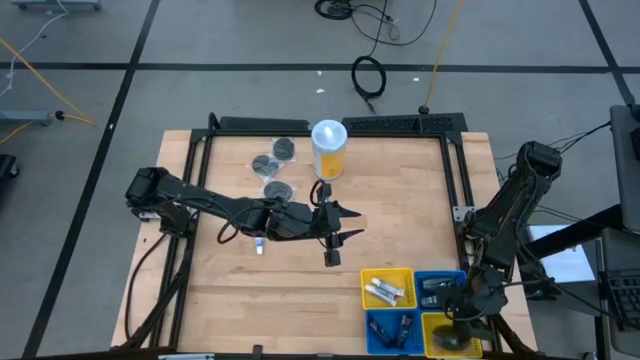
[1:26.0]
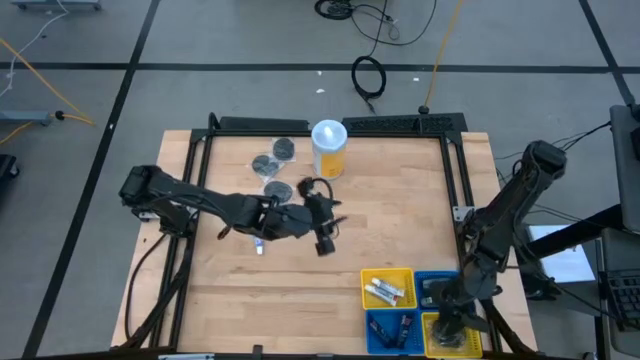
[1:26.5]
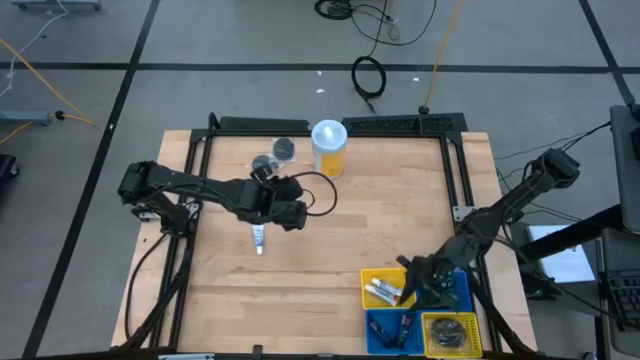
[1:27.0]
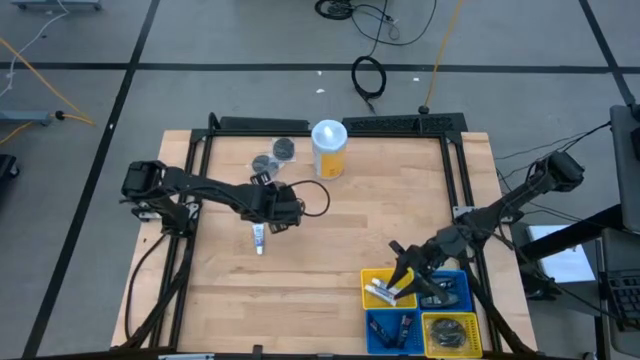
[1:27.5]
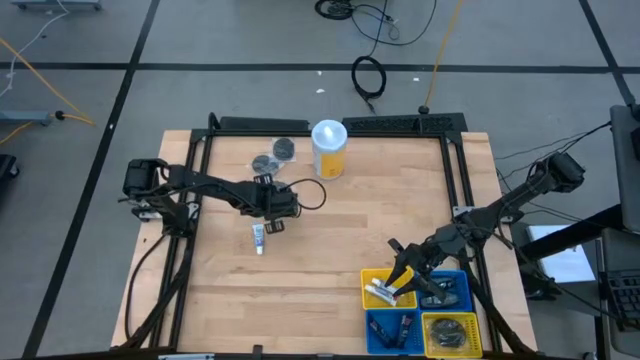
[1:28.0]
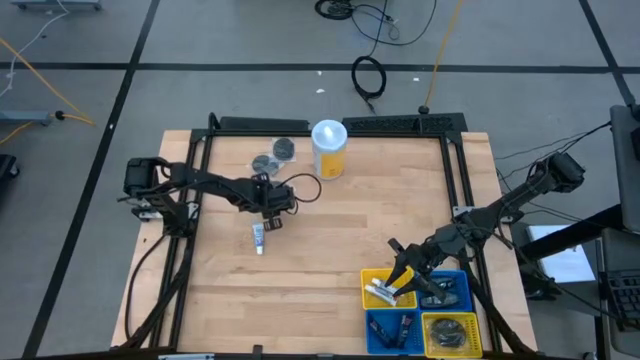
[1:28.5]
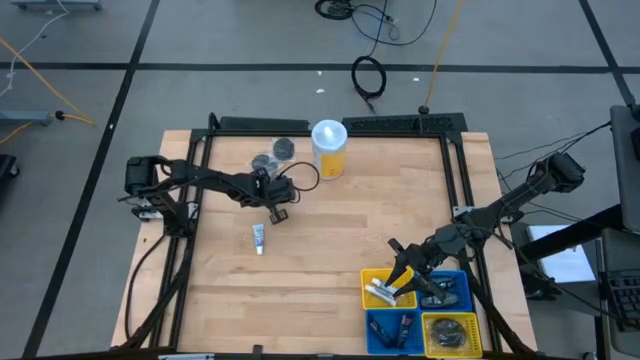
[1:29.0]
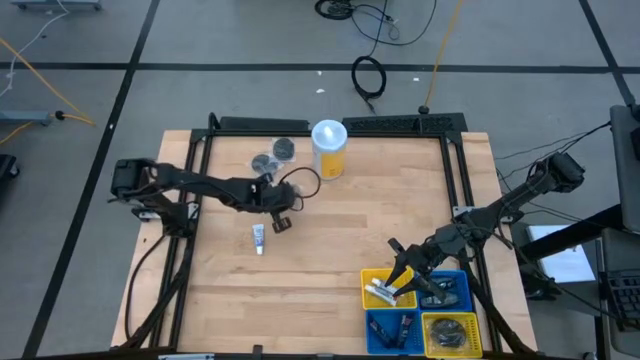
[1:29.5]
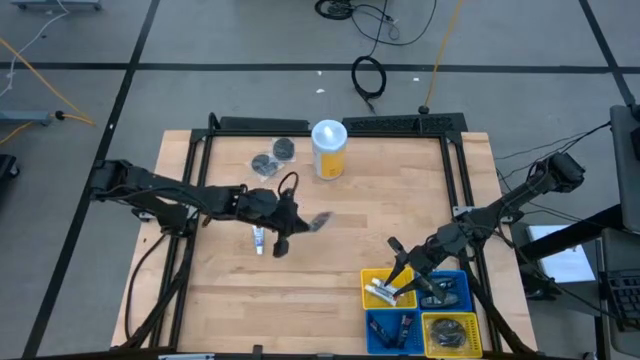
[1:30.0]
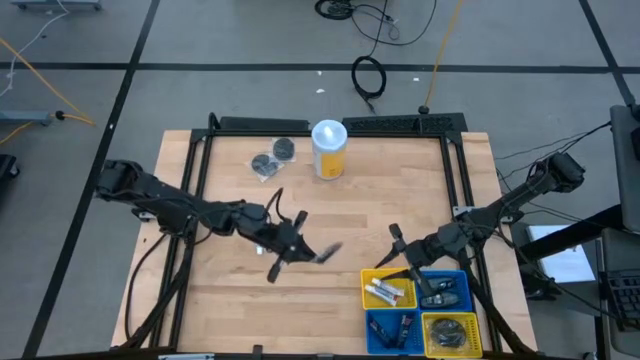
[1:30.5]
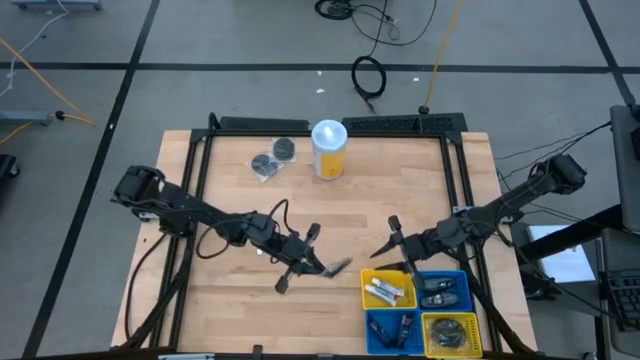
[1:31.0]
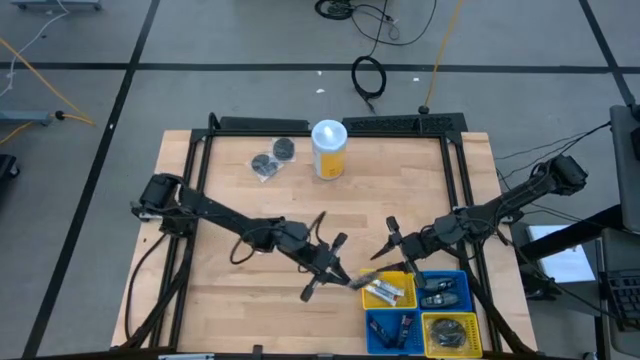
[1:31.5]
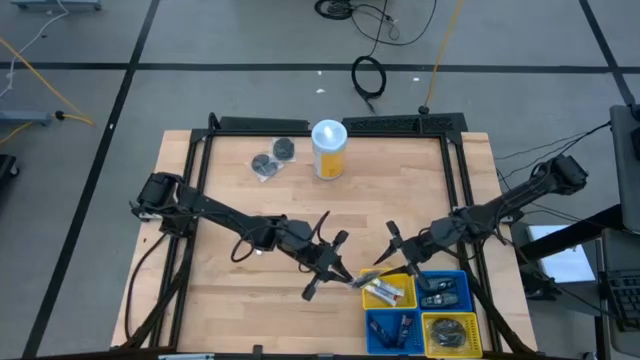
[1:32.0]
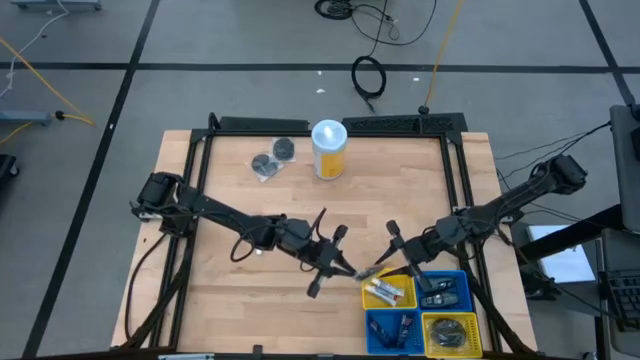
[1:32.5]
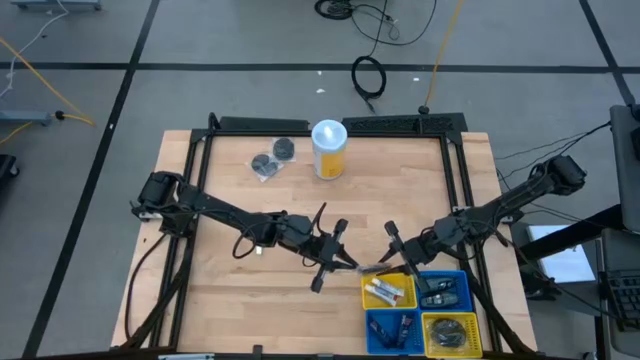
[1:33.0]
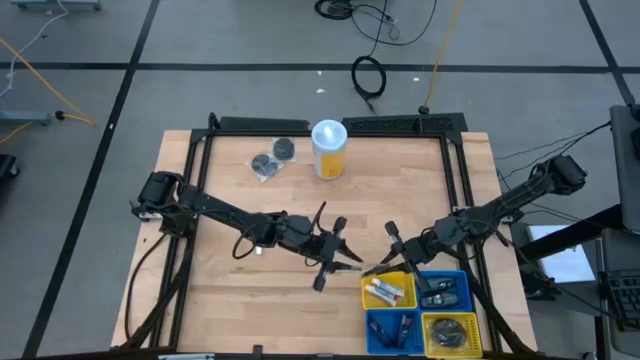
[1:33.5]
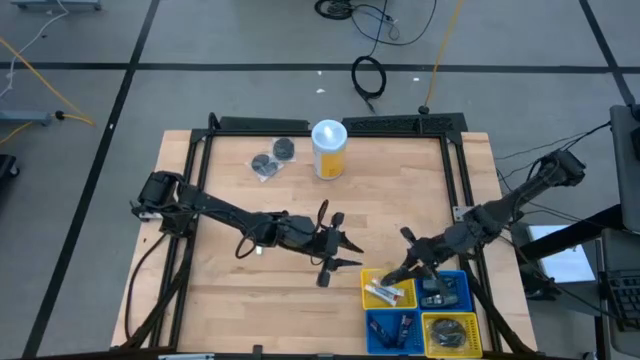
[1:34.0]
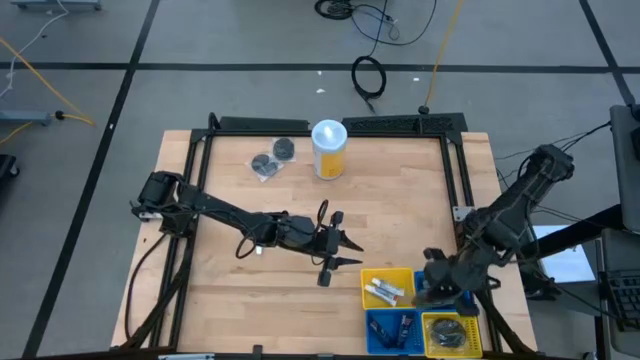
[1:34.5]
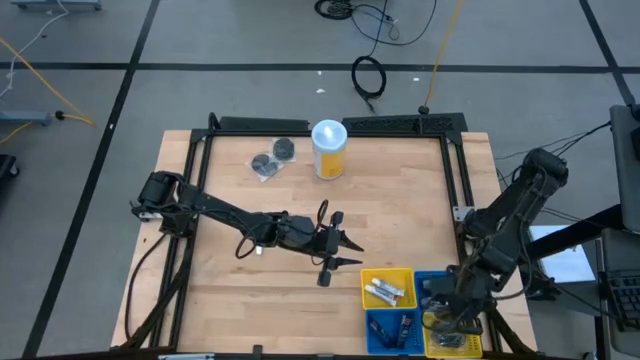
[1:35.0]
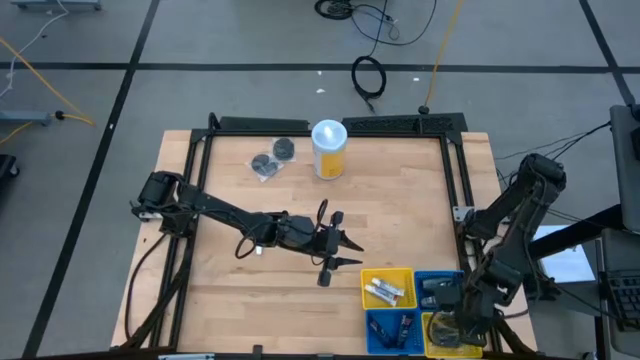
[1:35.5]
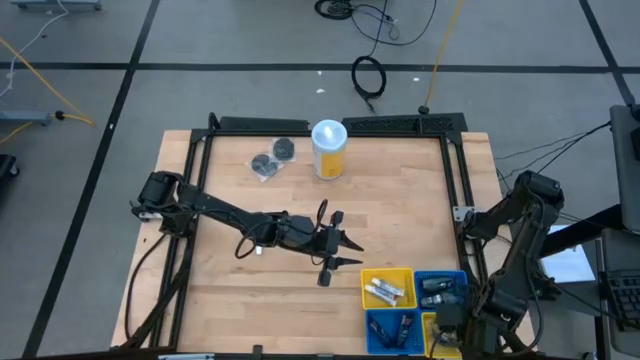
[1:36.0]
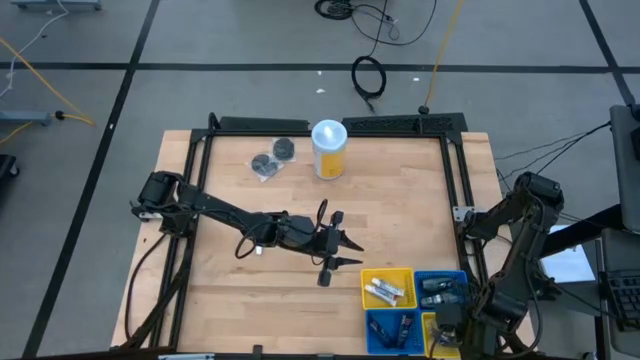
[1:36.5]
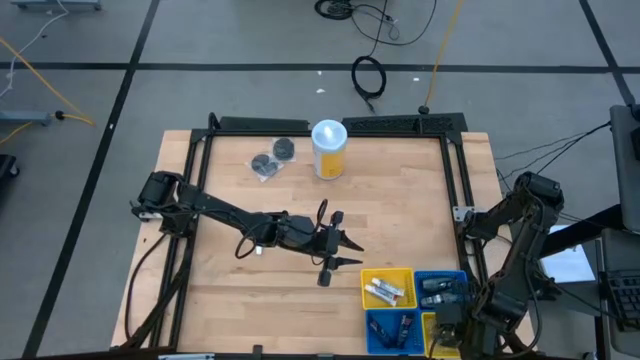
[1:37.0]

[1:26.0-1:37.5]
Task: Pick & Place Travel size toiletries
Put the hairbrush into the bottom yellow basket

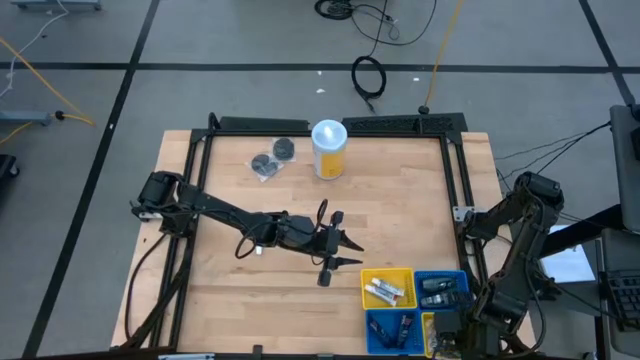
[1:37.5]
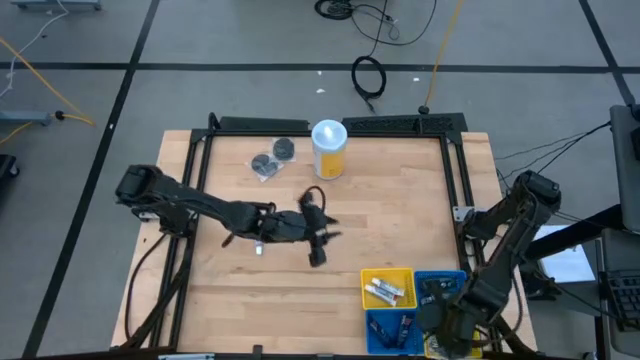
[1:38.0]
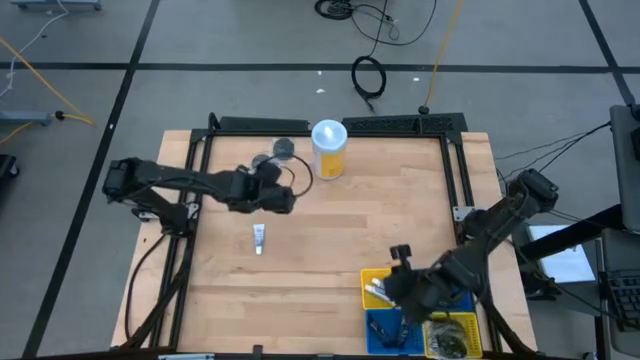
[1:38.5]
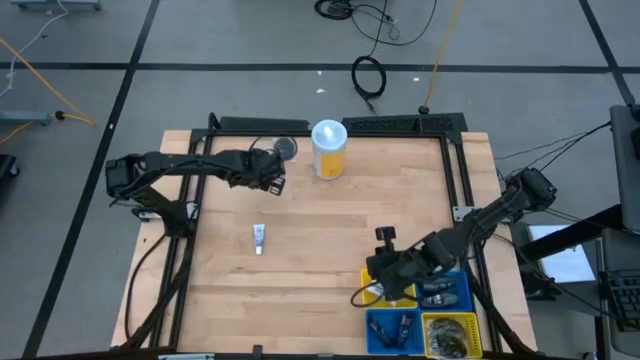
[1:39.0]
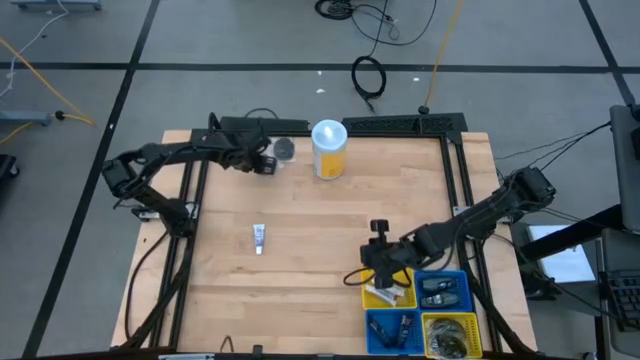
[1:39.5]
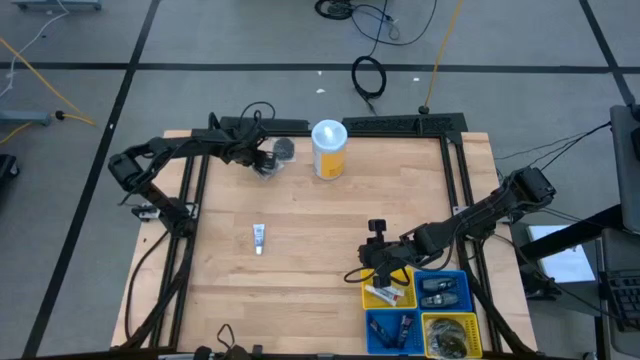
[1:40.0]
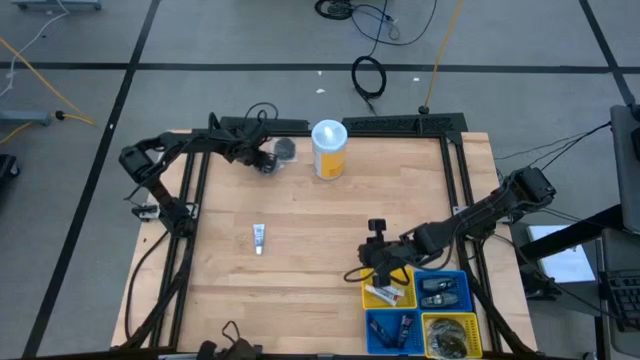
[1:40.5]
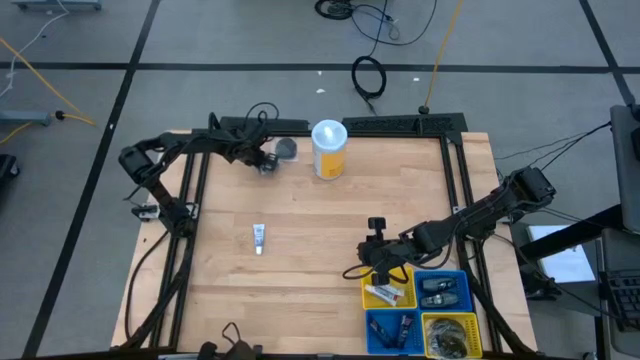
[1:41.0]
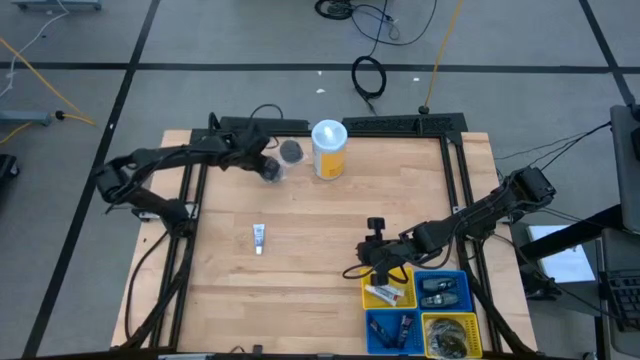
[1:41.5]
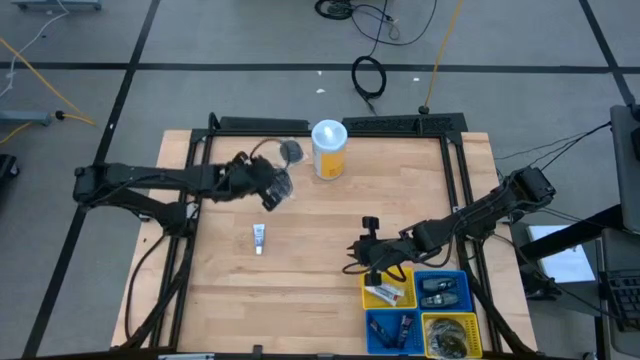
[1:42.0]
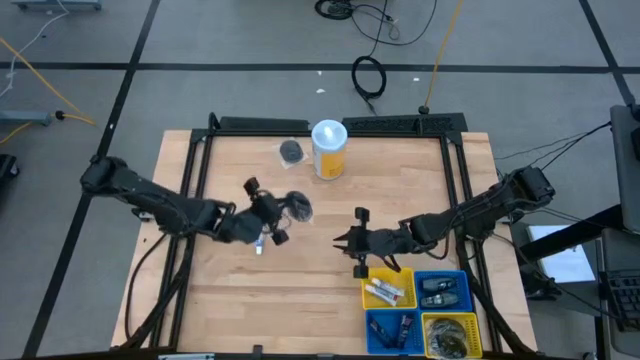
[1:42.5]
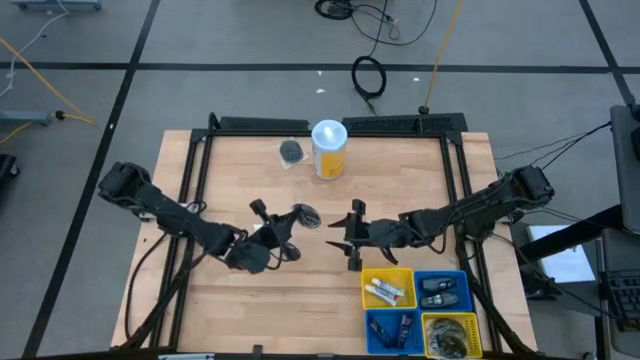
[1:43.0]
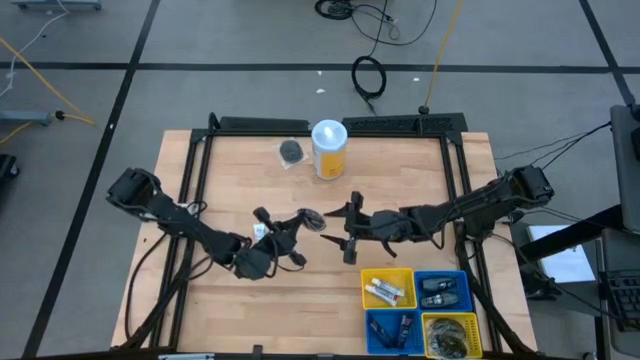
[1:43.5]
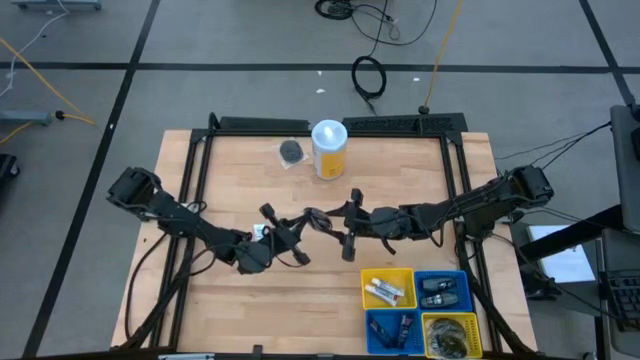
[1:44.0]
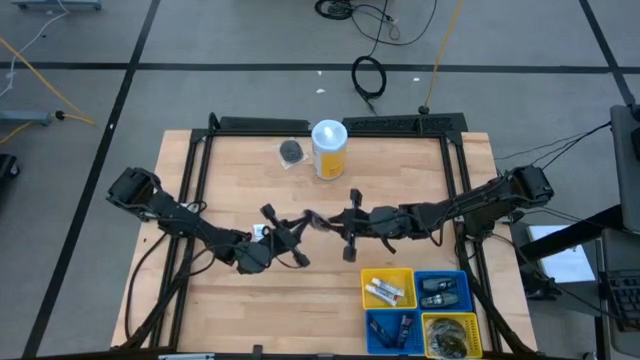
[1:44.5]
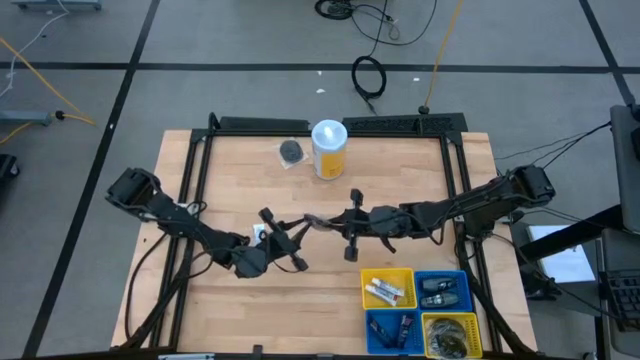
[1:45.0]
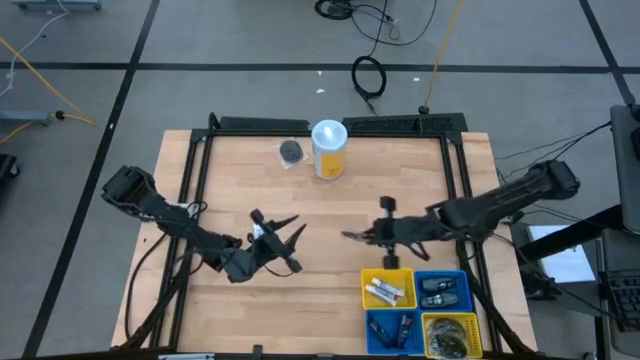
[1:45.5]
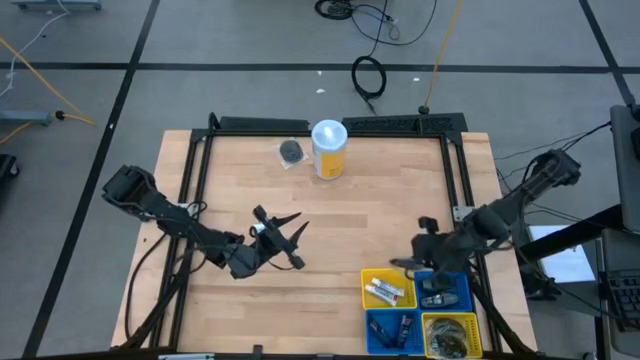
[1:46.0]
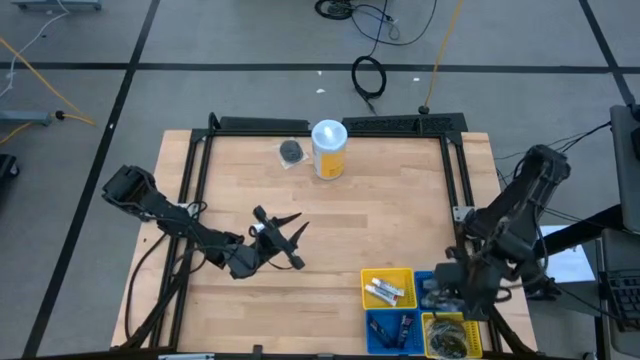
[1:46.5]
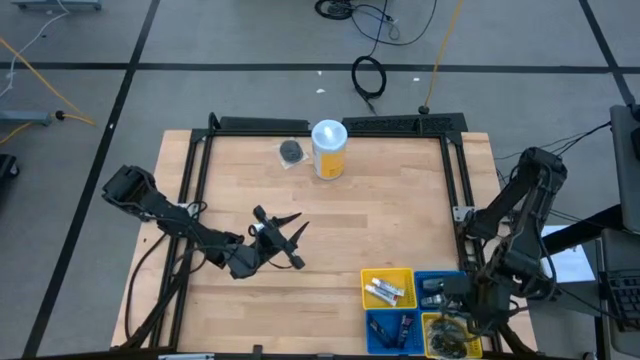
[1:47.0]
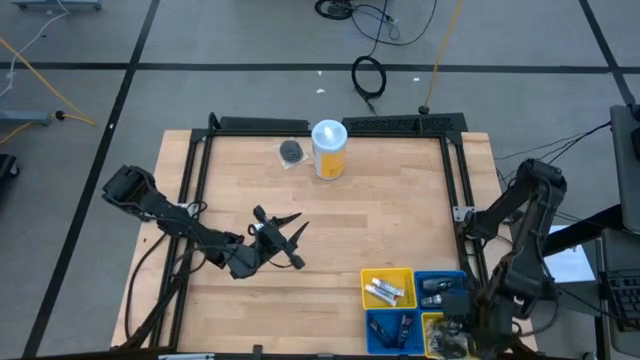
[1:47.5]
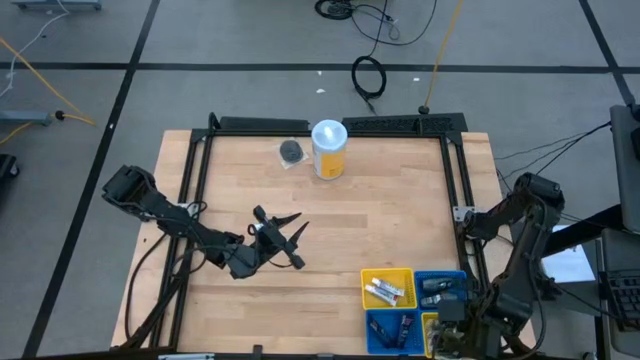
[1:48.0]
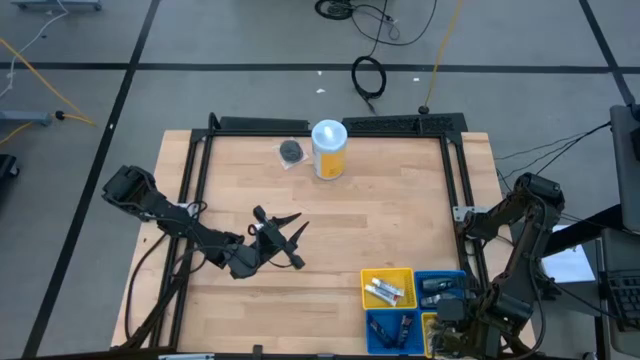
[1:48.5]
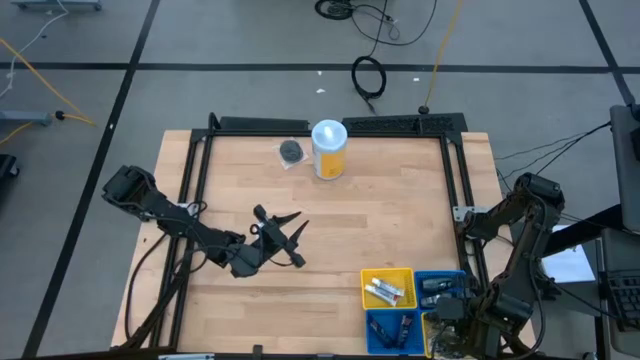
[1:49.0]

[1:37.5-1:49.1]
Put the hairbrush into the bottom yellow basket
